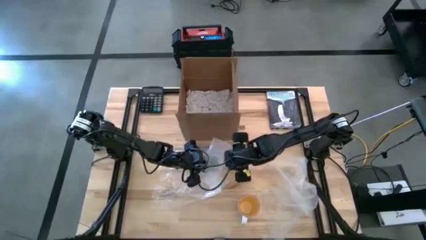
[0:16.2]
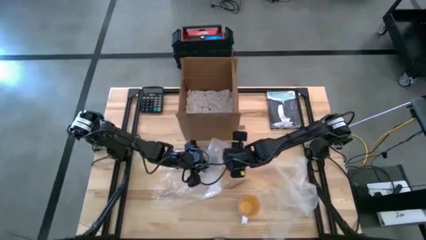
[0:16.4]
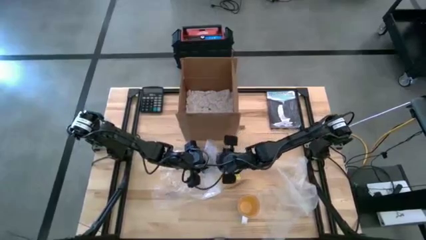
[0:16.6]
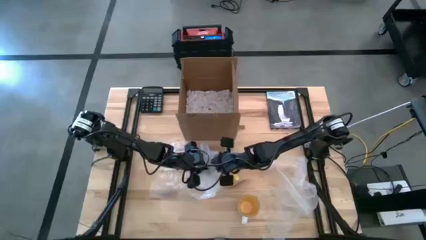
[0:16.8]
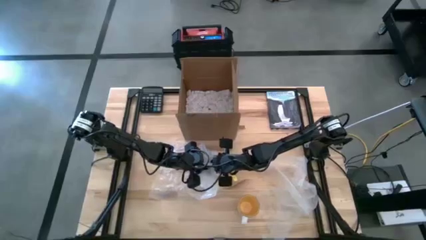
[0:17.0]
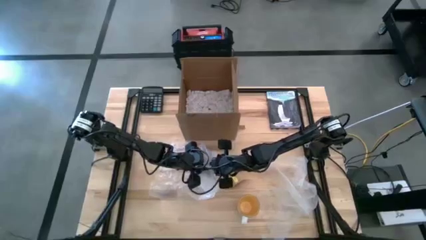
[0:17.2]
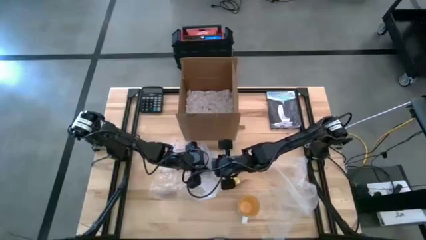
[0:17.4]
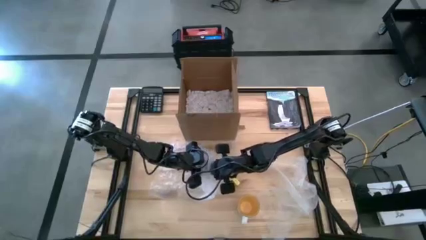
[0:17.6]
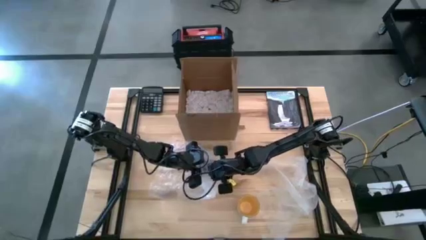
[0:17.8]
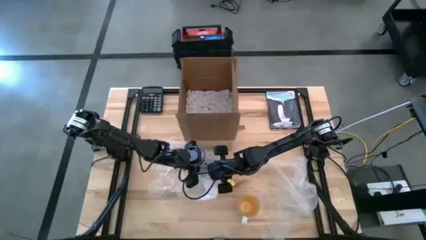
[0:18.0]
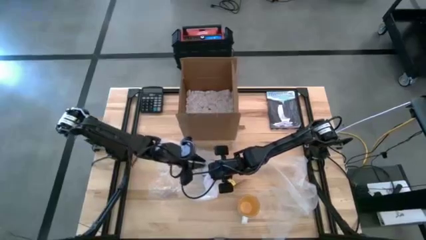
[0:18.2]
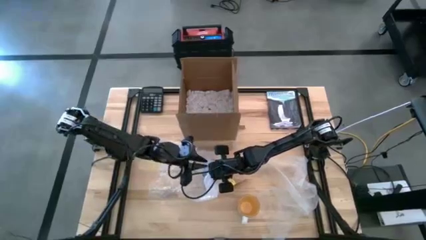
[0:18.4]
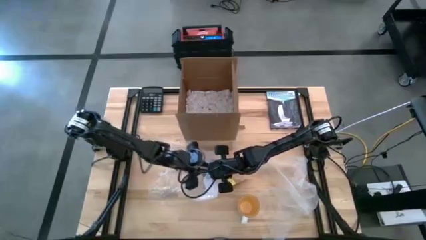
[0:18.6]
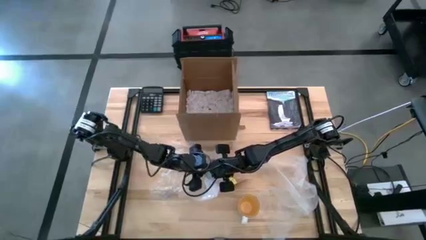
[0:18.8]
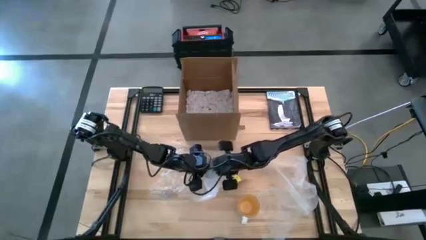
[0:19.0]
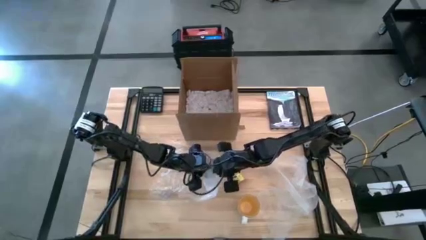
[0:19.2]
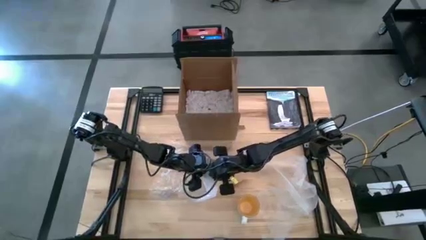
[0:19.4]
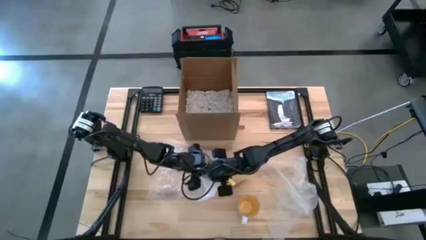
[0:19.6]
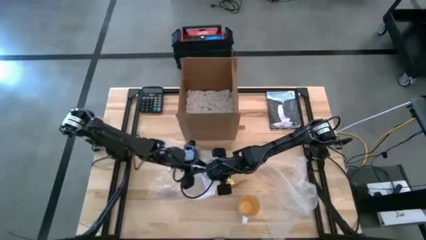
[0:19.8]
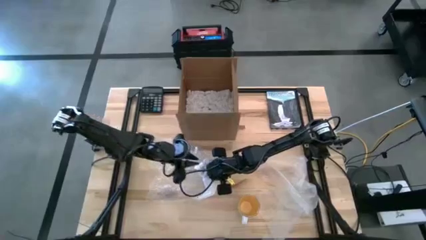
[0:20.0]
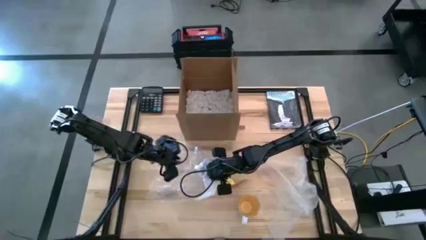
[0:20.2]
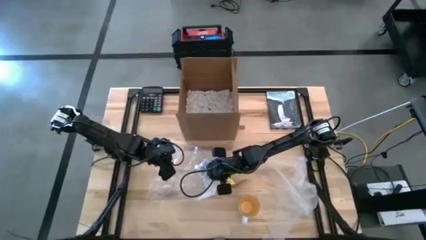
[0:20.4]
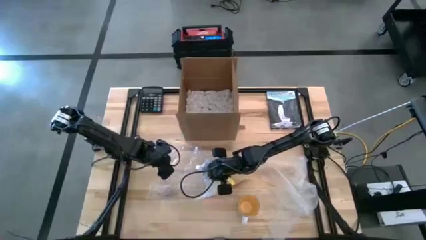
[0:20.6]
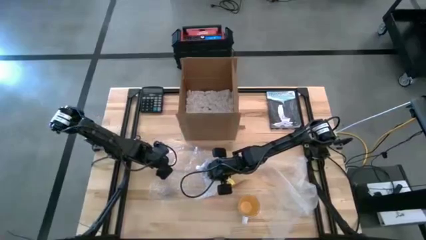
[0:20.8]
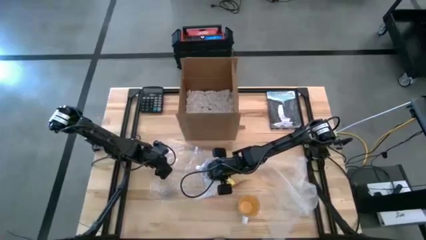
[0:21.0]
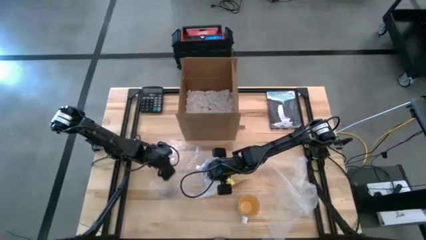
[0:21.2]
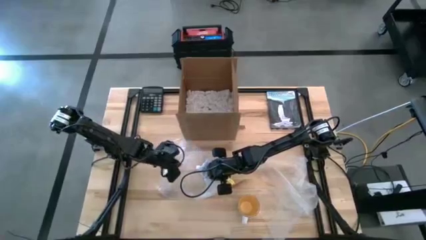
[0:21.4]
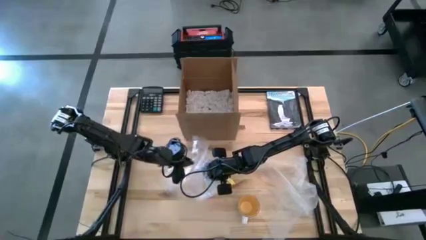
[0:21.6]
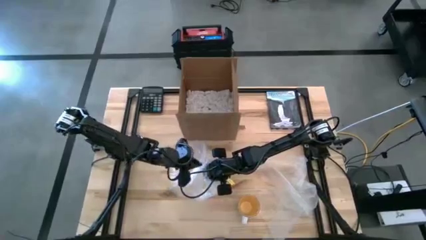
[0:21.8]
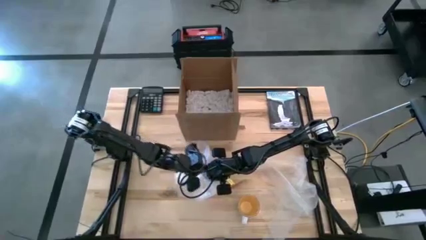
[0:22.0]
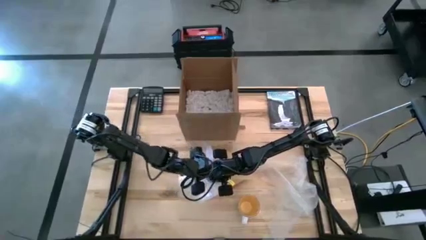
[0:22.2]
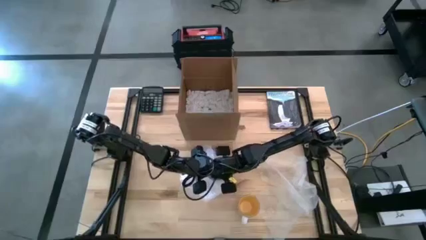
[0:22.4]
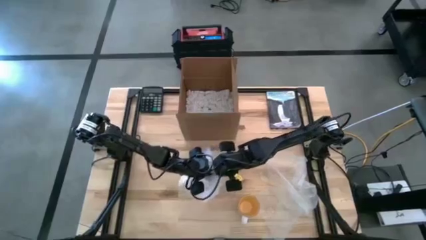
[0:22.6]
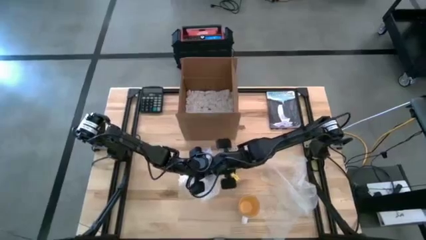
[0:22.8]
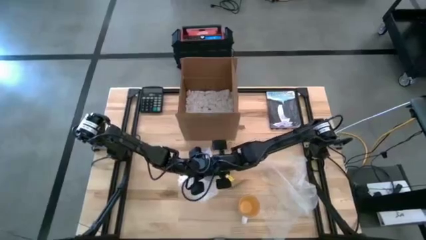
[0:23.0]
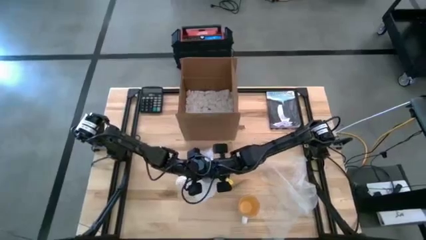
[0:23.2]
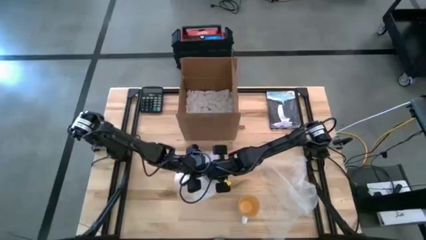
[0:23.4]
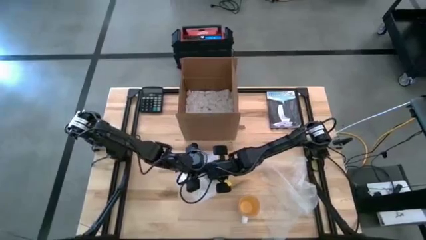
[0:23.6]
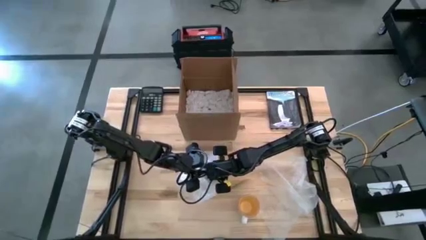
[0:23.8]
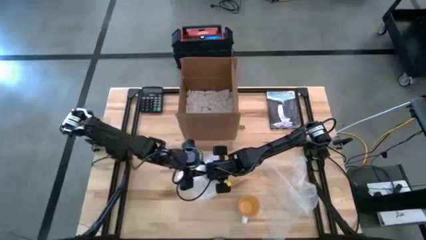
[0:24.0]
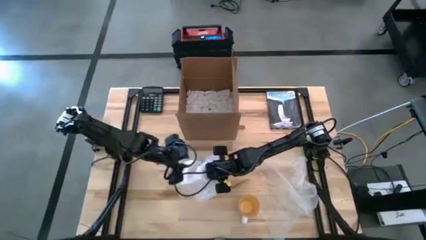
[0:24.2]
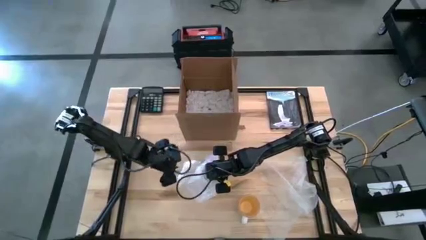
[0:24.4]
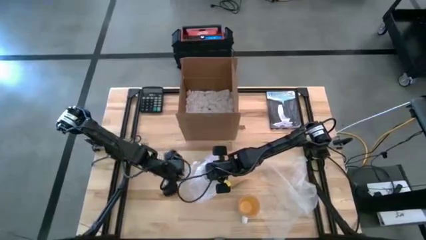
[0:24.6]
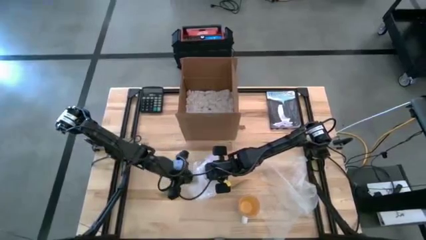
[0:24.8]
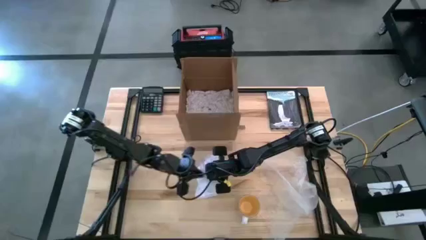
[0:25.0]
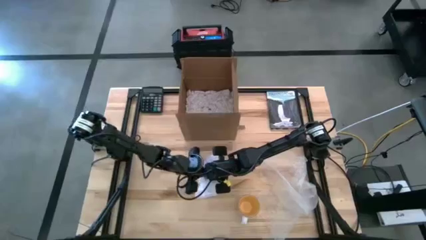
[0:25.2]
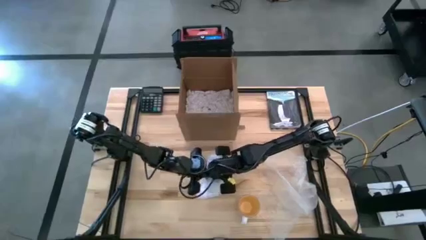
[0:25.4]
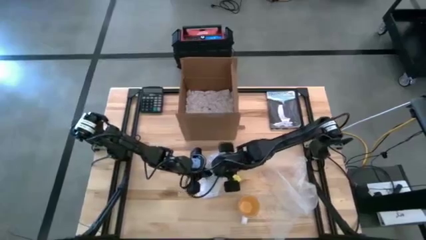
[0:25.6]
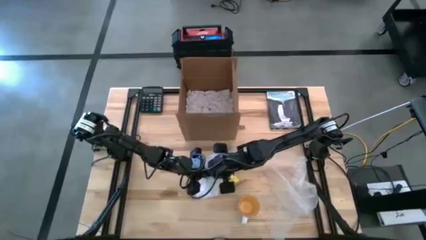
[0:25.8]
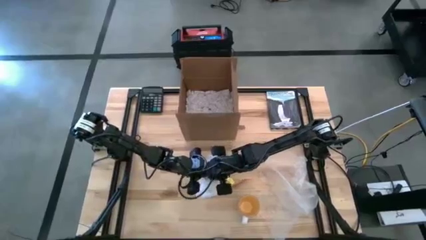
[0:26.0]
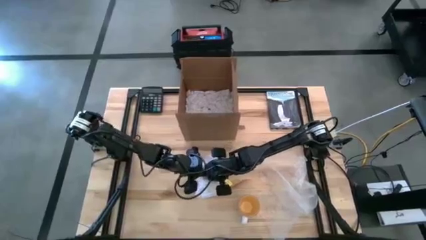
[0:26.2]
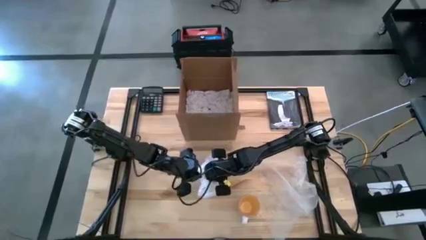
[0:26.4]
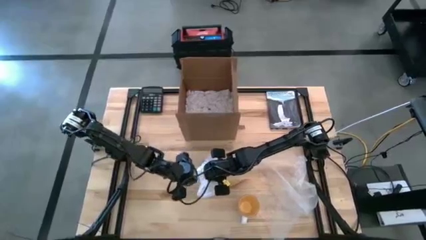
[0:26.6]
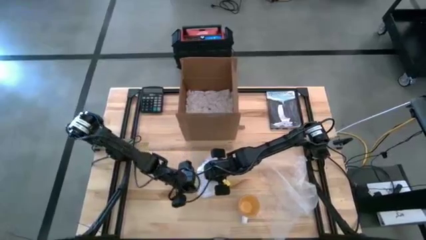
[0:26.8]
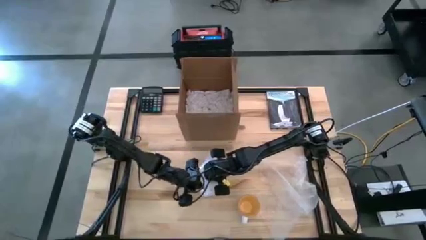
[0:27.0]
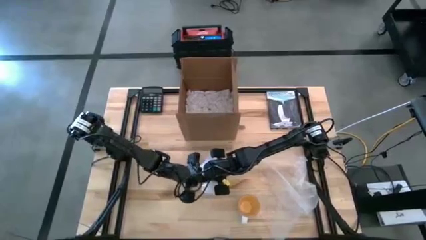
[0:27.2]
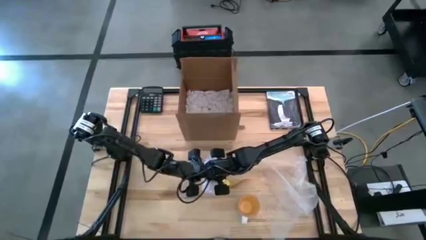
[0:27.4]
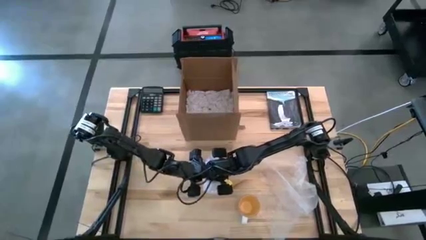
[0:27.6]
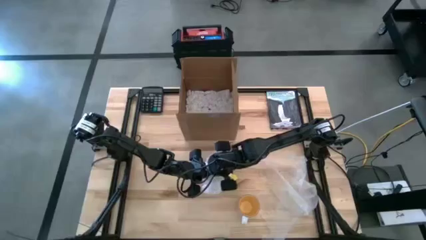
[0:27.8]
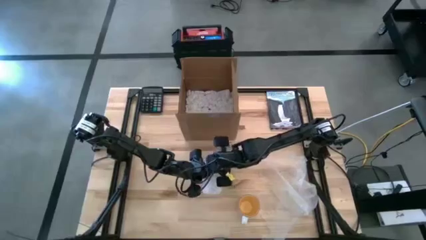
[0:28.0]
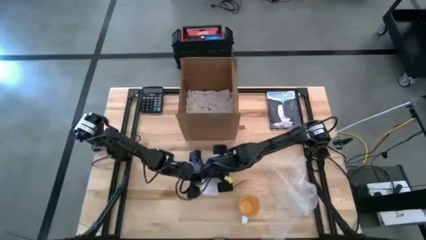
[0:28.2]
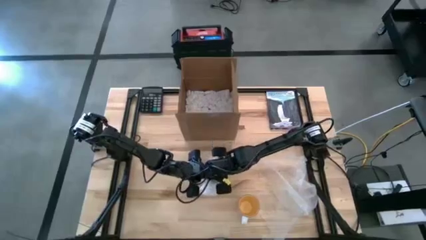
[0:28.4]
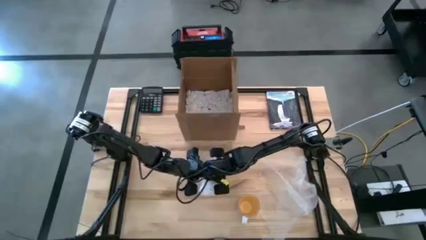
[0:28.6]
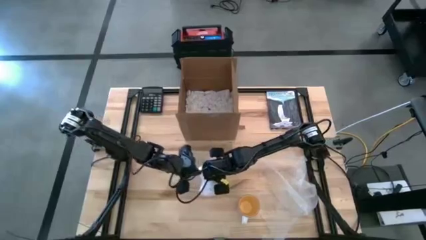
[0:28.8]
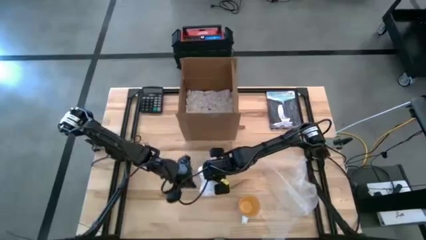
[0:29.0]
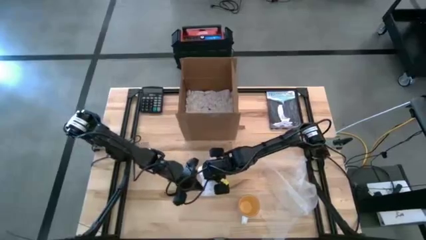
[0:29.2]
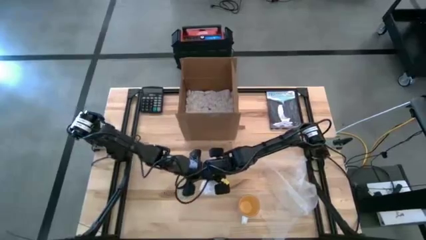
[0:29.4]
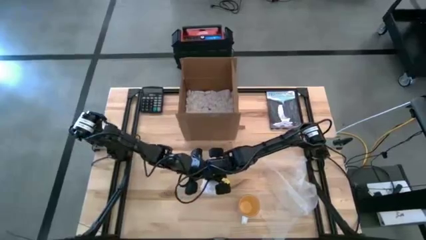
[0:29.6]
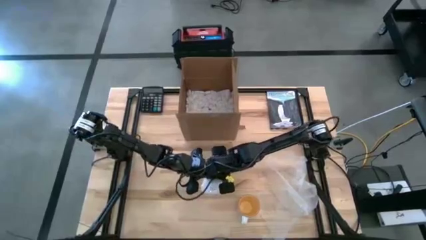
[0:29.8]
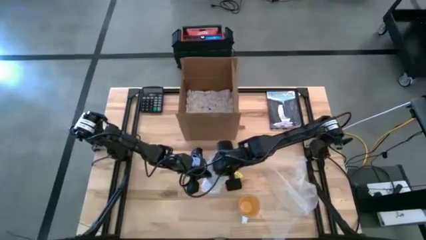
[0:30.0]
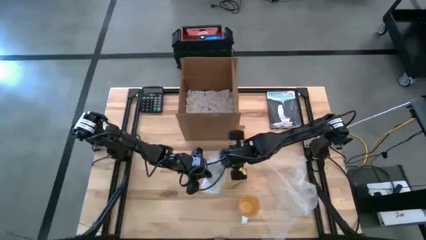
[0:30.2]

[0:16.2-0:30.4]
Task: wrap mug
Wrap the blue mug with bubble wrap

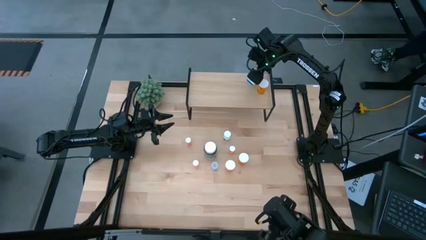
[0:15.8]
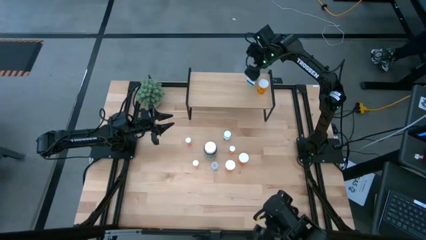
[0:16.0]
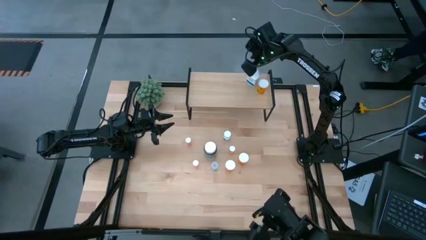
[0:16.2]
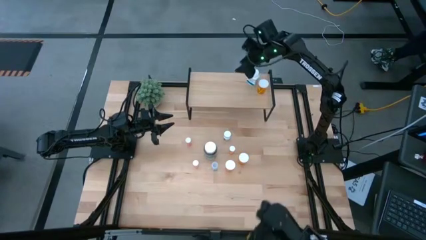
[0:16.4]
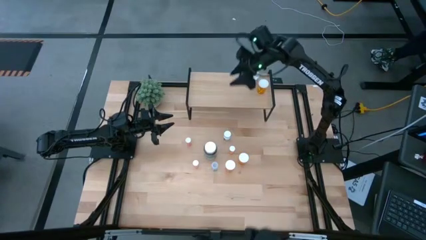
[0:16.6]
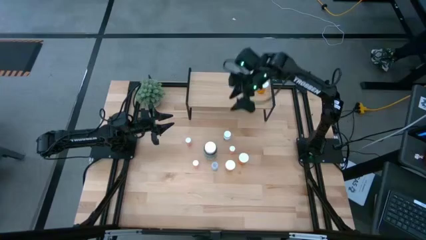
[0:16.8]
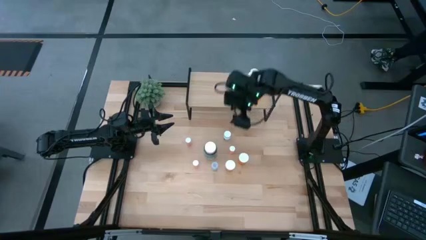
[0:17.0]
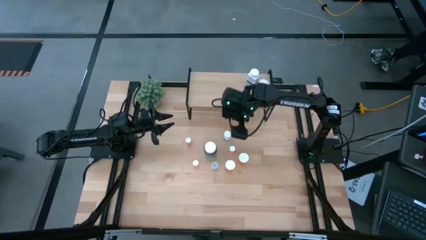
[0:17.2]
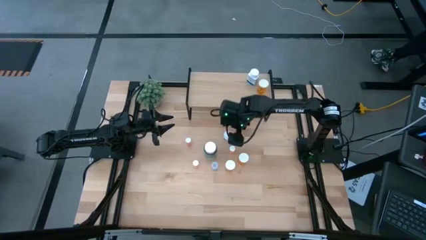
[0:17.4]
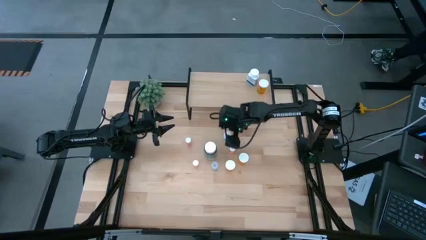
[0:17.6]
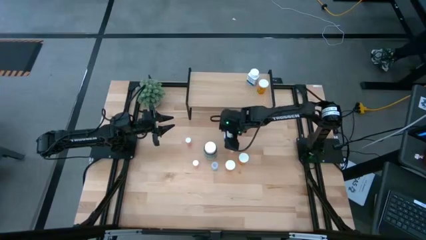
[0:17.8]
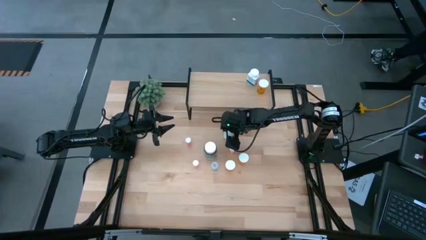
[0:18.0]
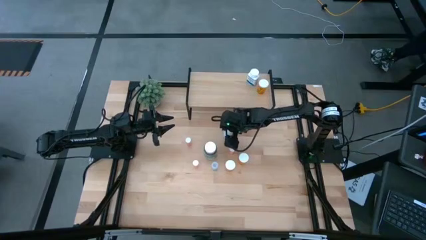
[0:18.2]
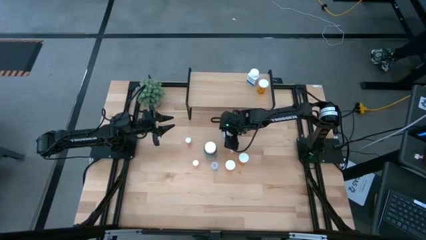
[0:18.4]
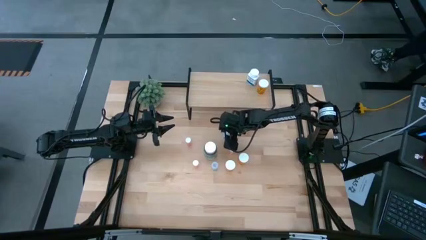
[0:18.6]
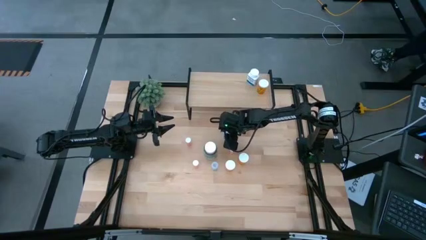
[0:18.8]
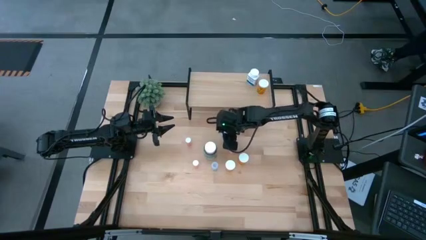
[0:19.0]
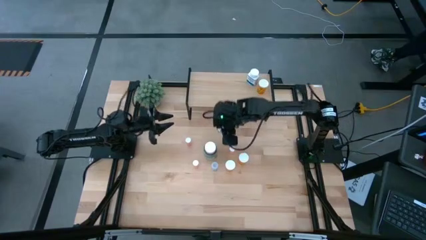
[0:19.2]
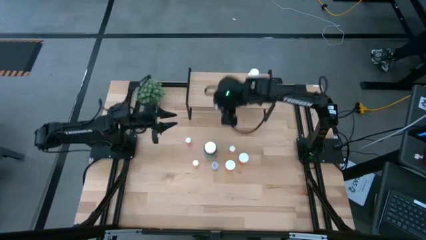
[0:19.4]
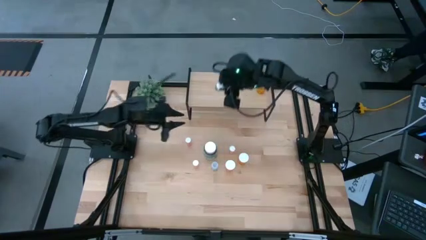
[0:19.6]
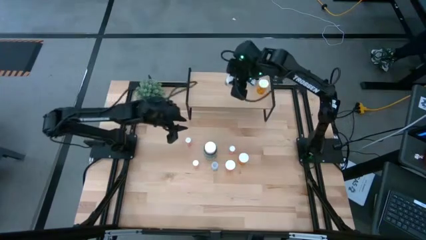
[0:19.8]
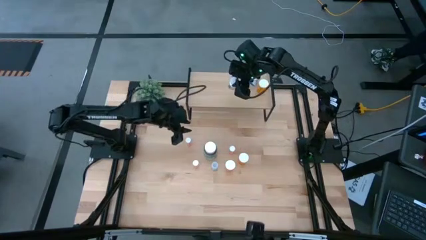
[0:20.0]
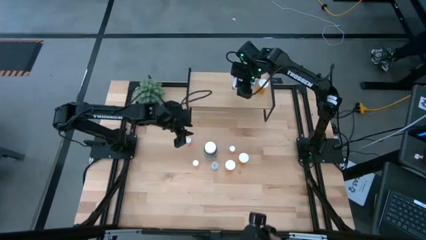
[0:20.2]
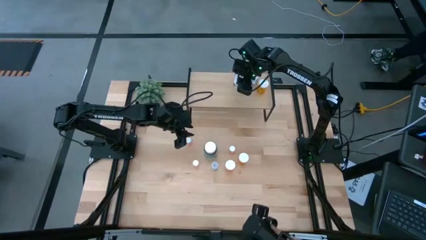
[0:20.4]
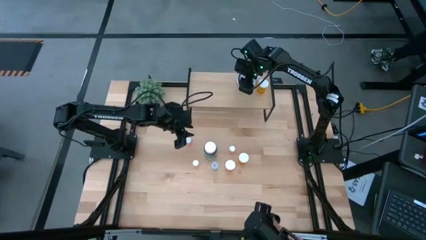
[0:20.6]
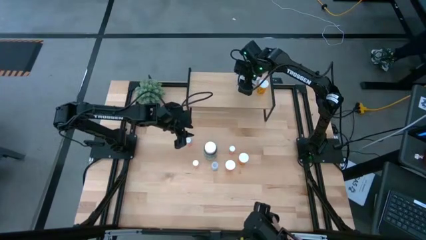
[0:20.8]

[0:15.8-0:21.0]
Task: Pick and place medicine bottles onto shelf by color
Put the small white medicine bottle on the shelf
